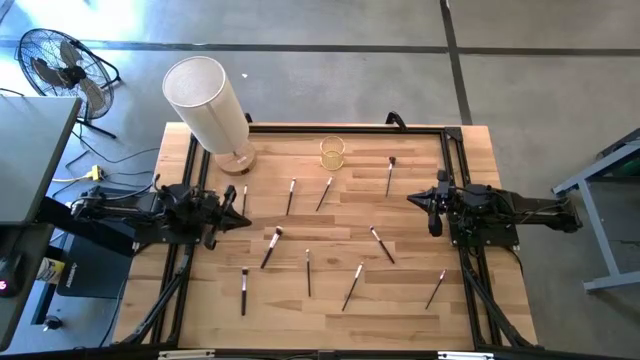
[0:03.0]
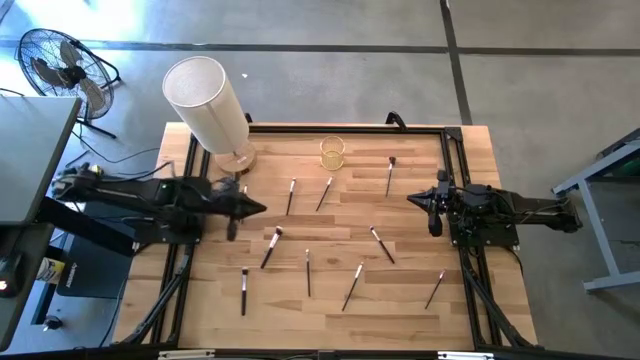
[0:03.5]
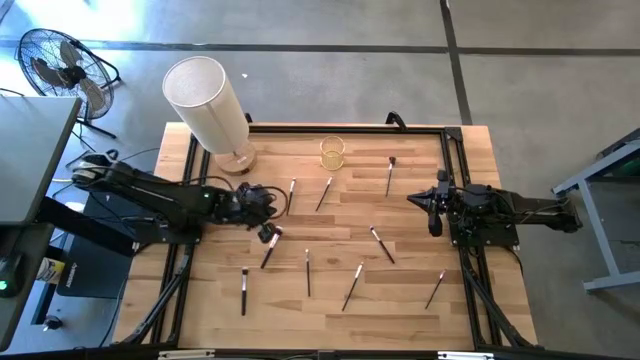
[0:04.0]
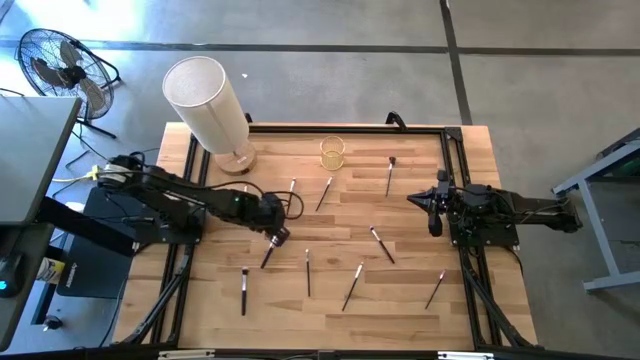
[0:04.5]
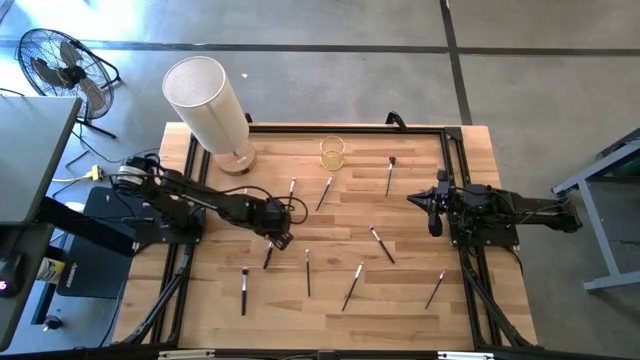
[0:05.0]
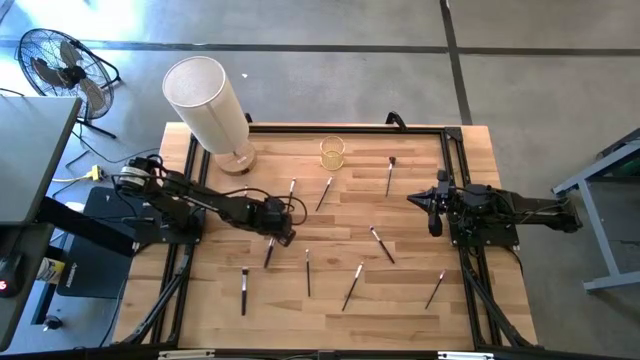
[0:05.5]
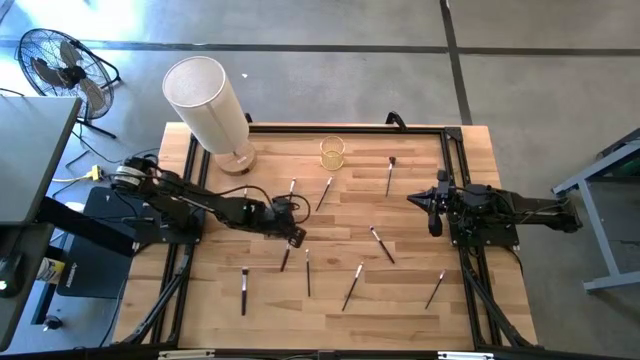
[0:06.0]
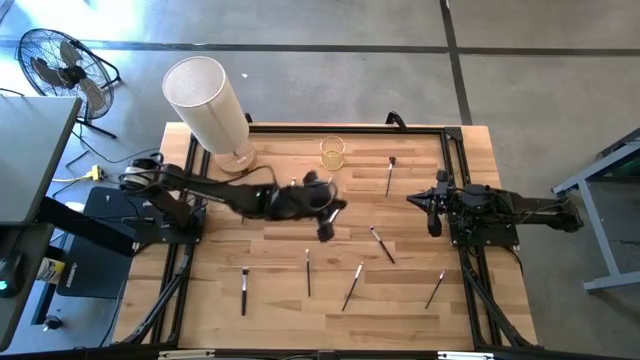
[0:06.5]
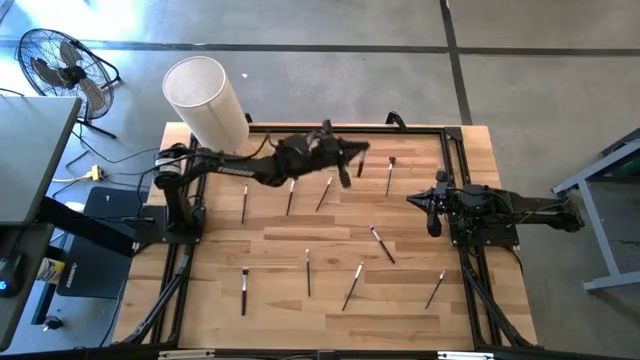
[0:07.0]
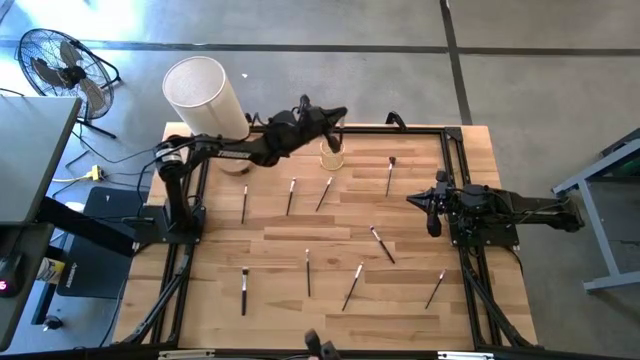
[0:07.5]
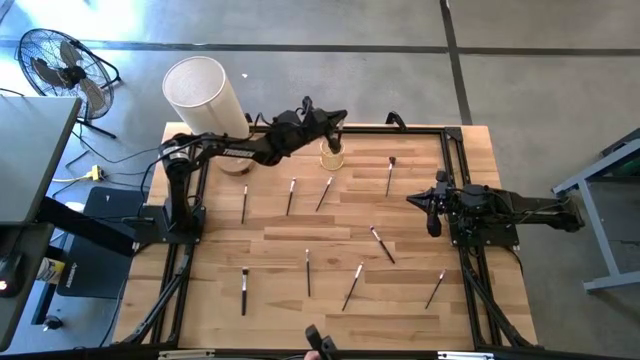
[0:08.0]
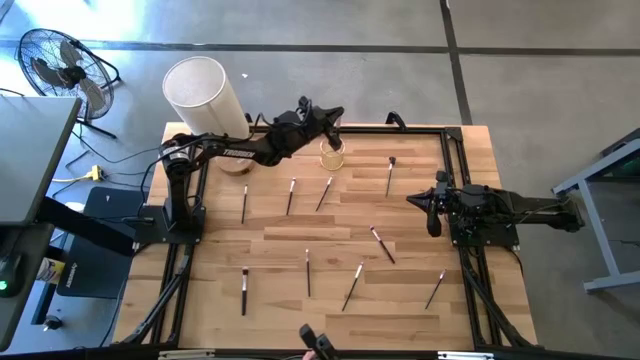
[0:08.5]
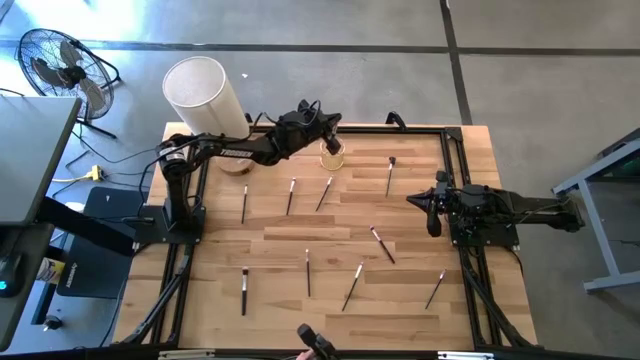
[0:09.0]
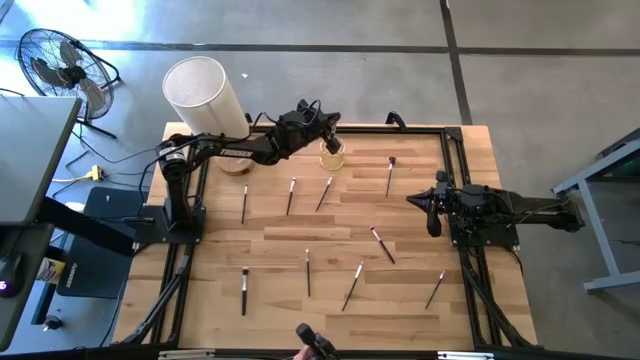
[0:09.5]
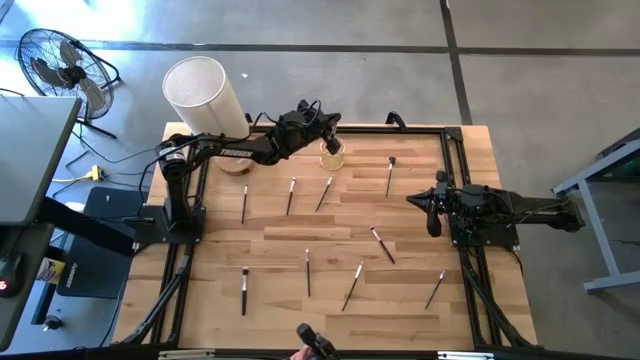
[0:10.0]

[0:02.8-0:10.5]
Task: Sort items
Put the small fan brush into the glass

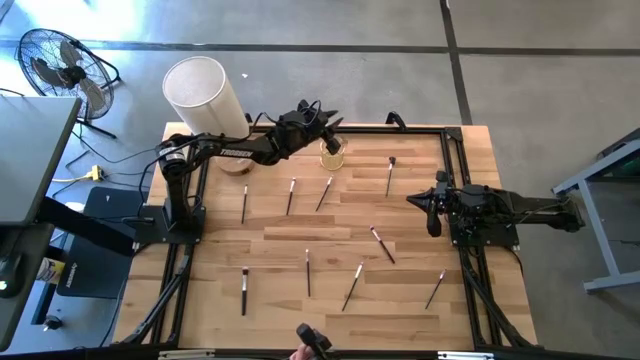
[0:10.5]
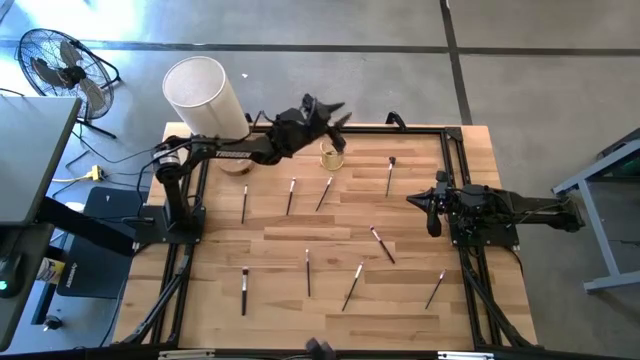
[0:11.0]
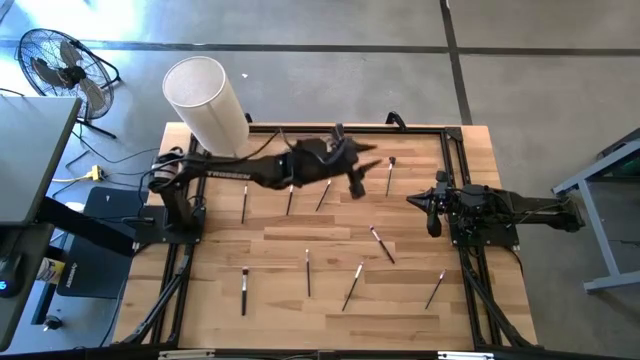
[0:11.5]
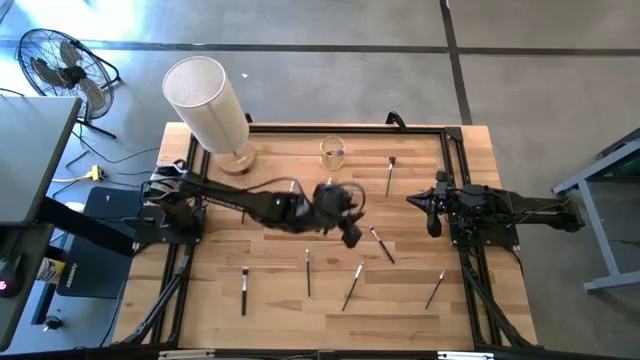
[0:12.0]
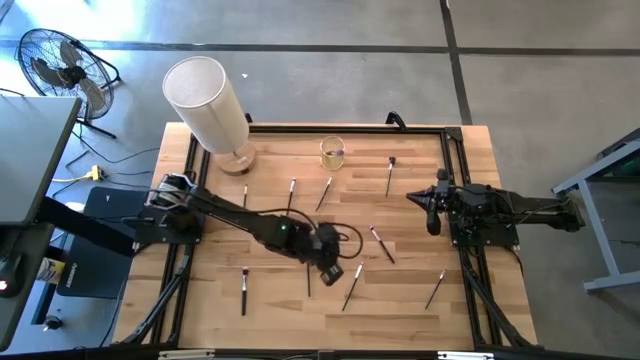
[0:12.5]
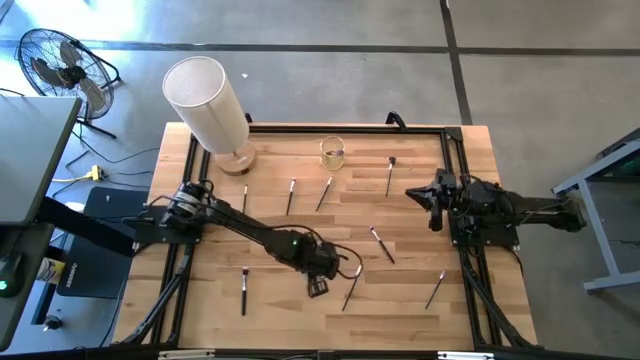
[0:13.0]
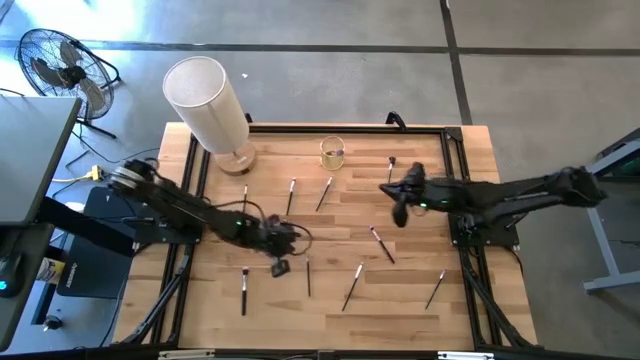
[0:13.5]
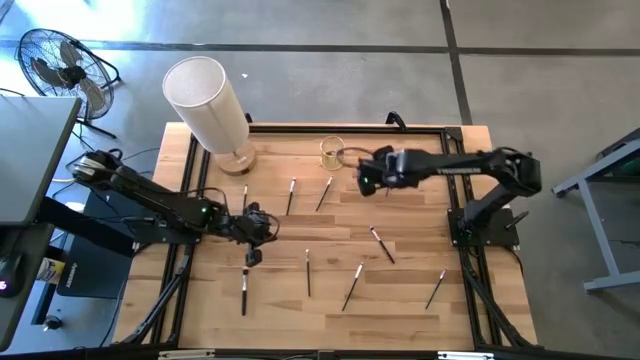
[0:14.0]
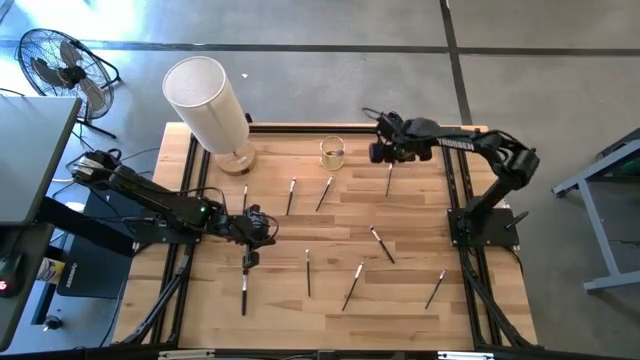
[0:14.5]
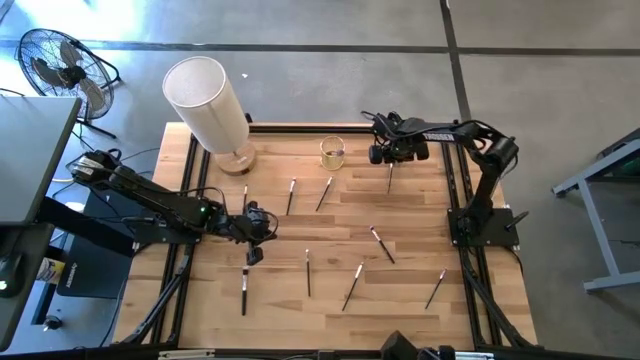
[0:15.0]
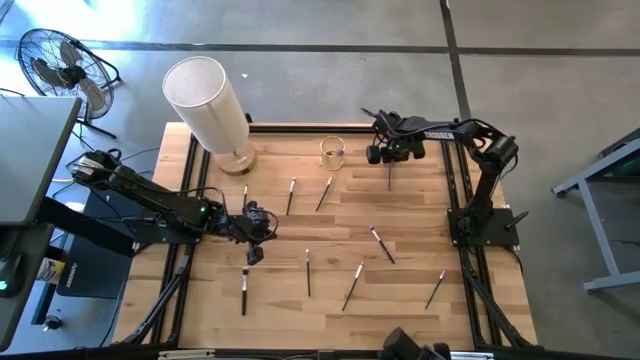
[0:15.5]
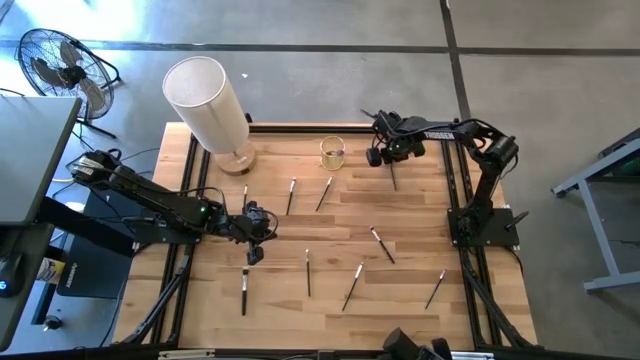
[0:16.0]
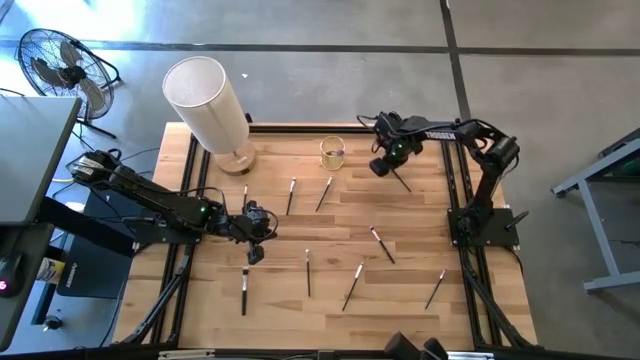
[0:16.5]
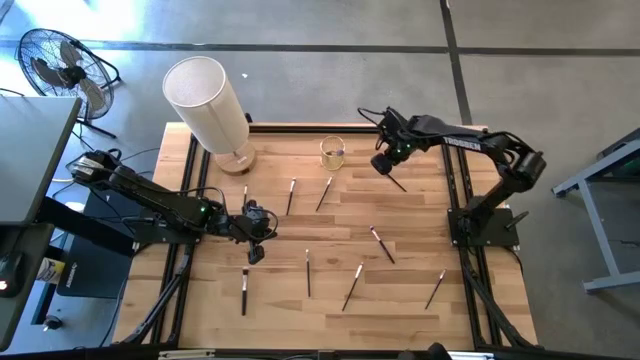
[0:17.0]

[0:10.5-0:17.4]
Put the dual eyebrow brush into the glass

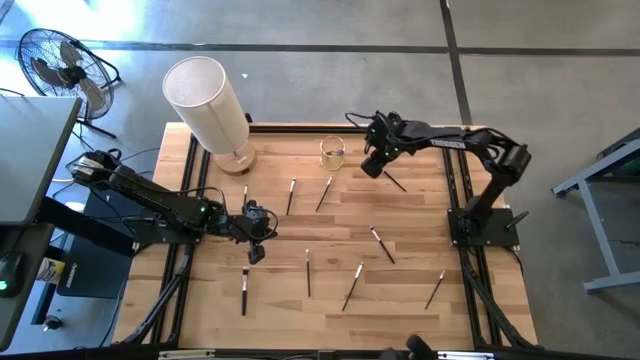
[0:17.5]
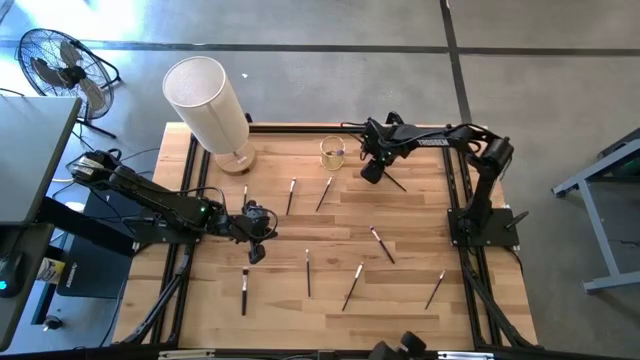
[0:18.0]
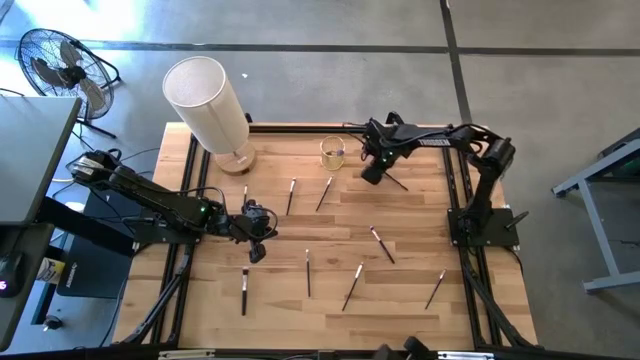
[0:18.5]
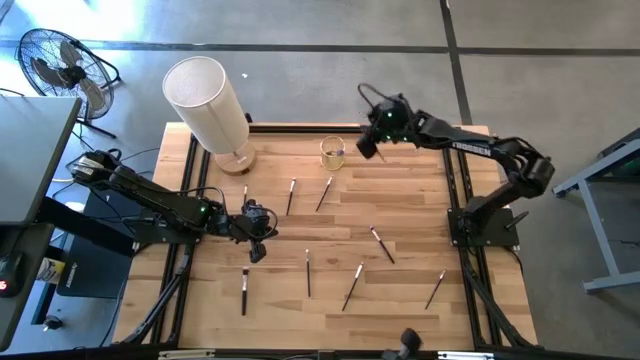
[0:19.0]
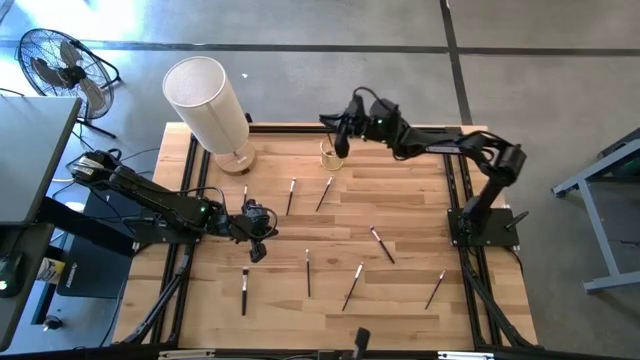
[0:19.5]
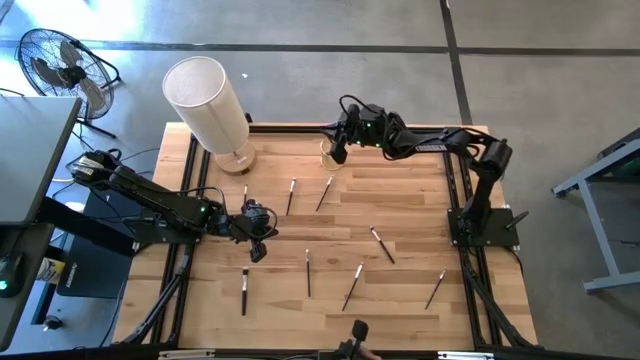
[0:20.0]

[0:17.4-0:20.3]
Put the dual eyebrow brush into the glass

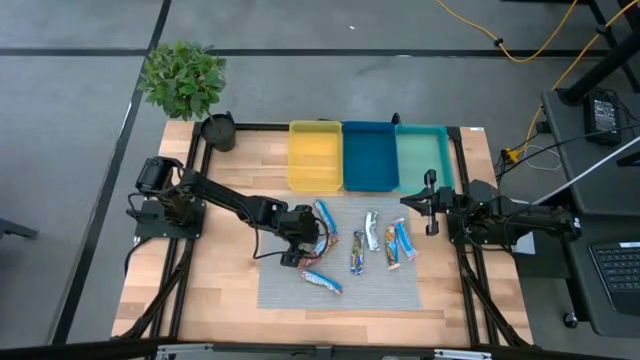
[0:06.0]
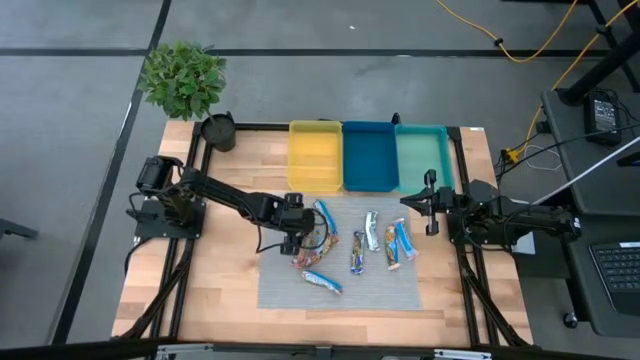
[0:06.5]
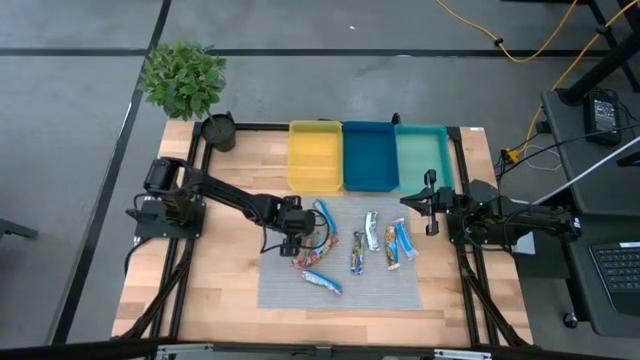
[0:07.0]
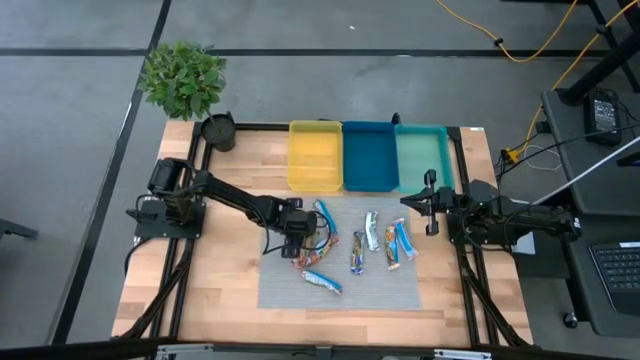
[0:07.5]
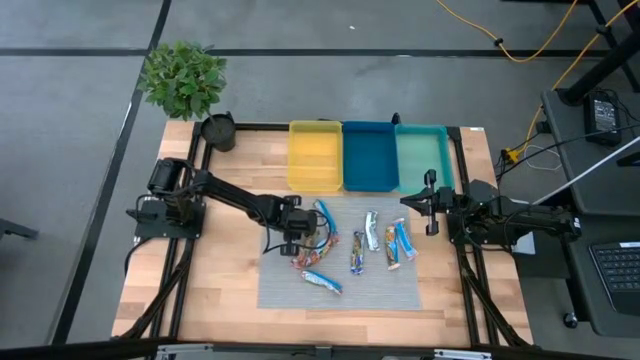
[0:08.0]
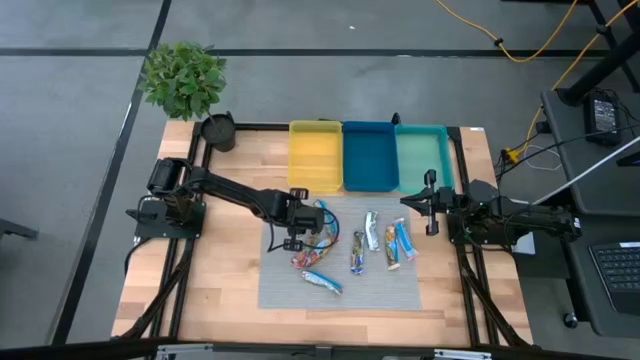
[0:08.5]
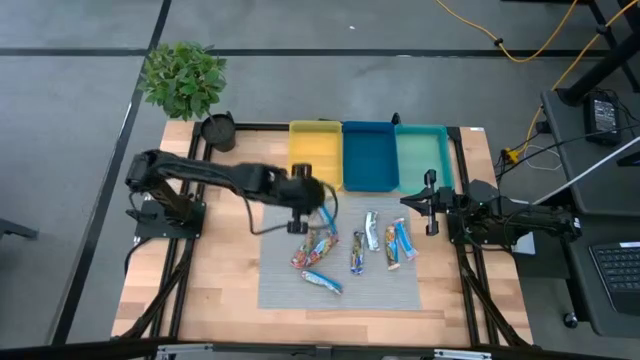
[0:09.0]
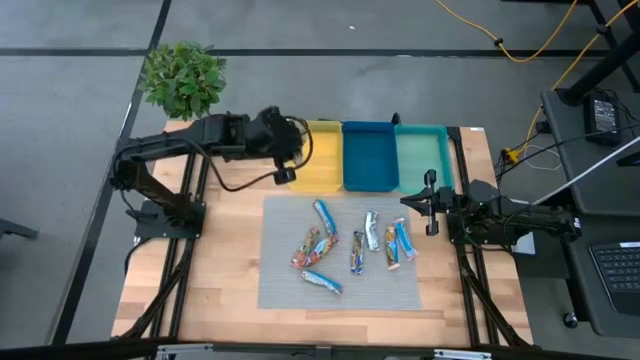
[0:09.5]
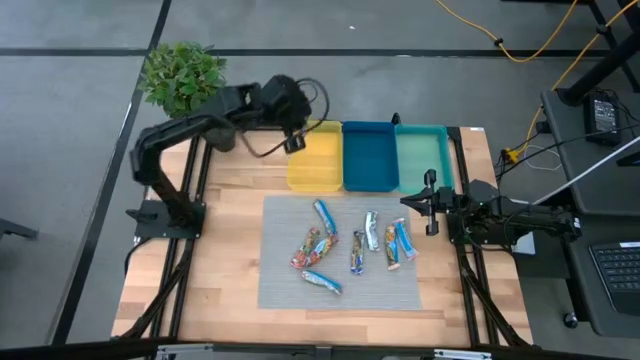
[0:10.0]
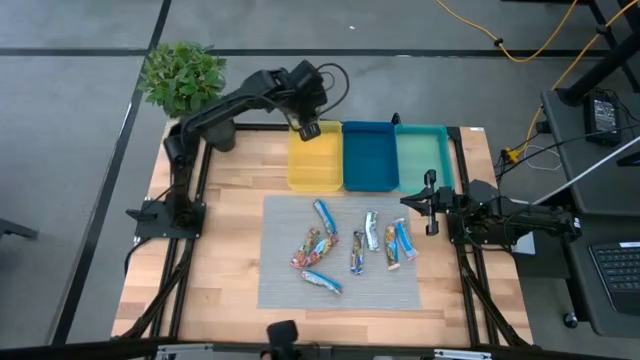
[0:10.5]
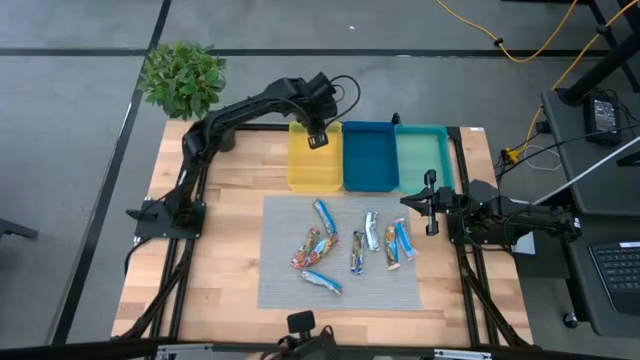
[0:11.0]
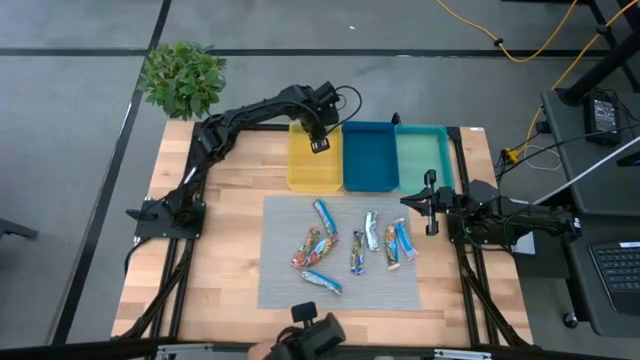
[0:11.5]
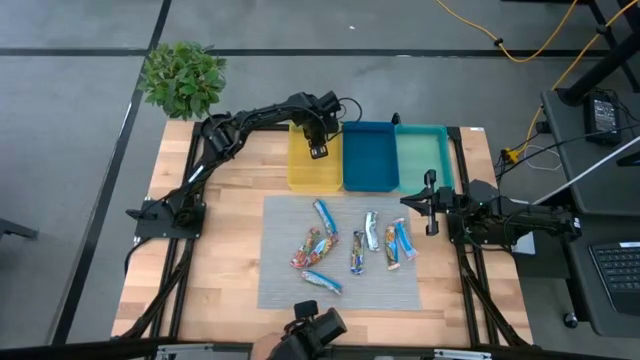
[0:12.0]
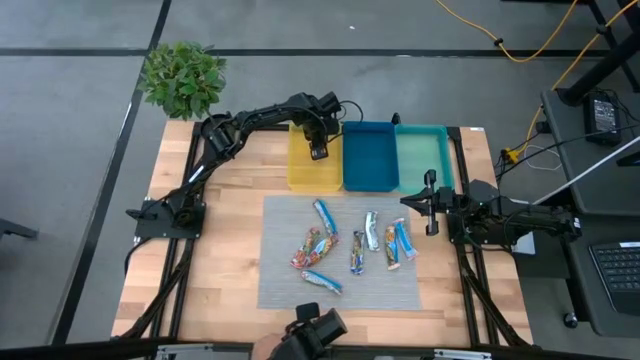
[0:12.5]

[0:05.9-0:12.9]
Task: Pick and place Granola Bars by type
Put the left yellow granola bar into the yellow bin
